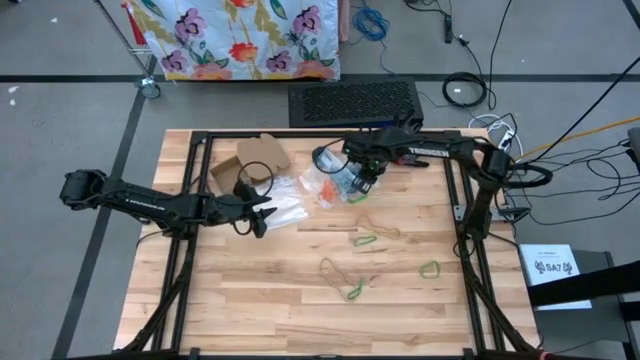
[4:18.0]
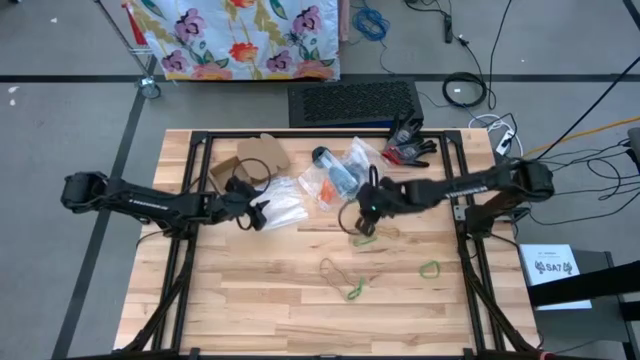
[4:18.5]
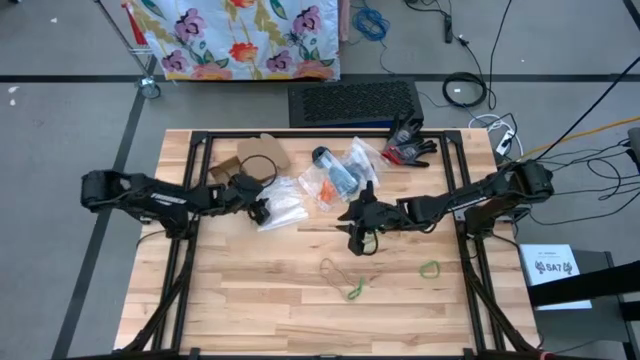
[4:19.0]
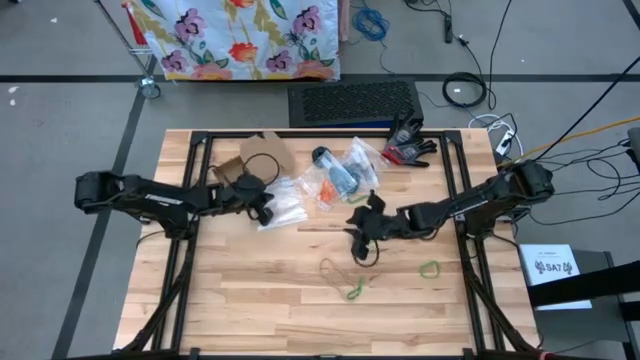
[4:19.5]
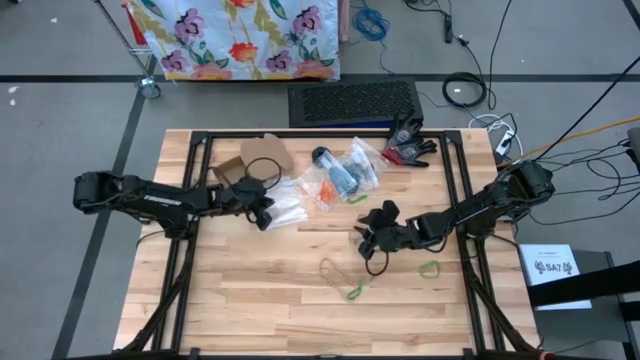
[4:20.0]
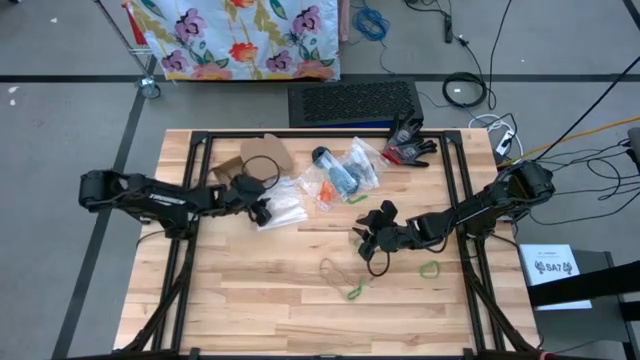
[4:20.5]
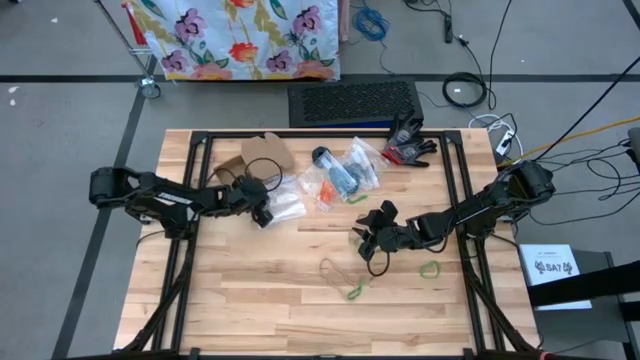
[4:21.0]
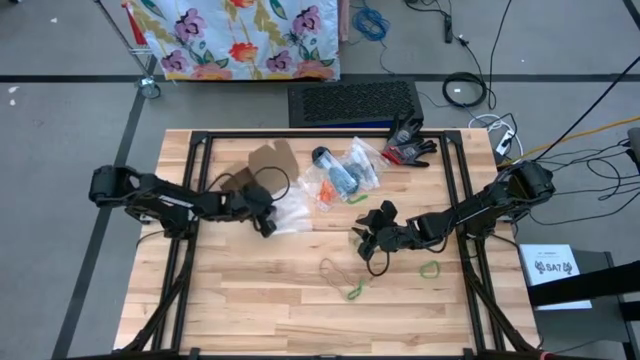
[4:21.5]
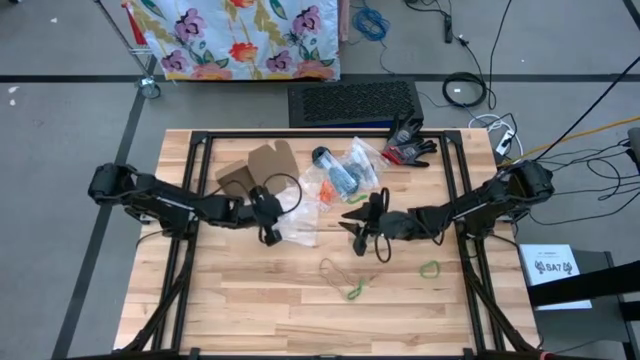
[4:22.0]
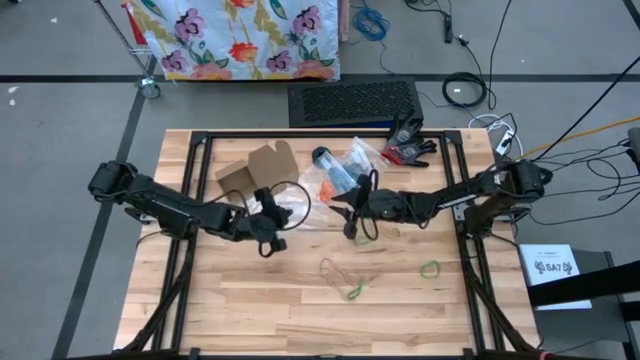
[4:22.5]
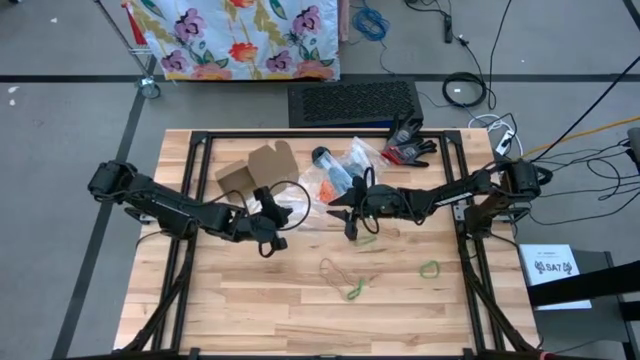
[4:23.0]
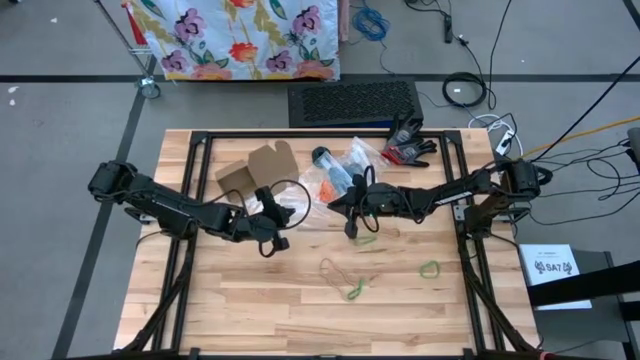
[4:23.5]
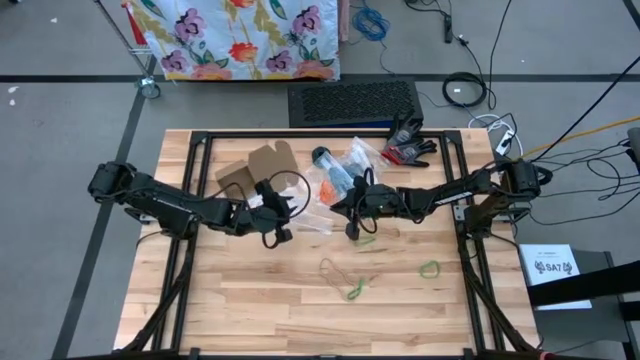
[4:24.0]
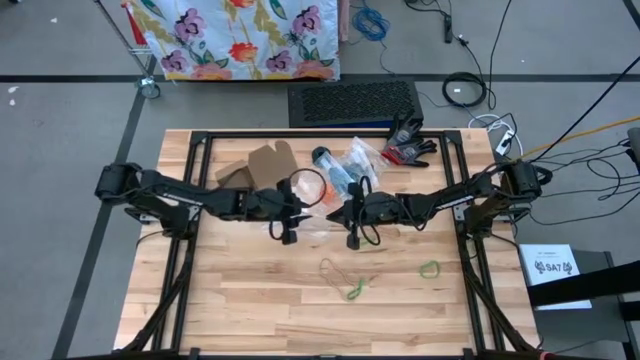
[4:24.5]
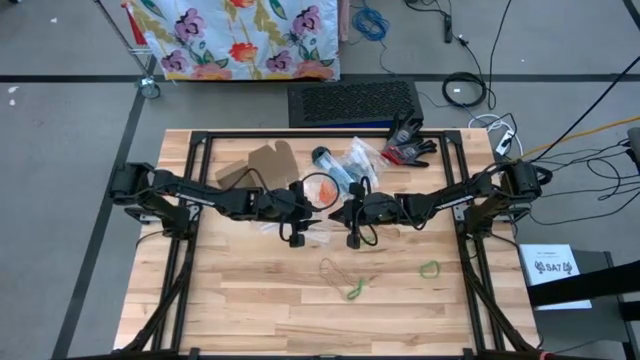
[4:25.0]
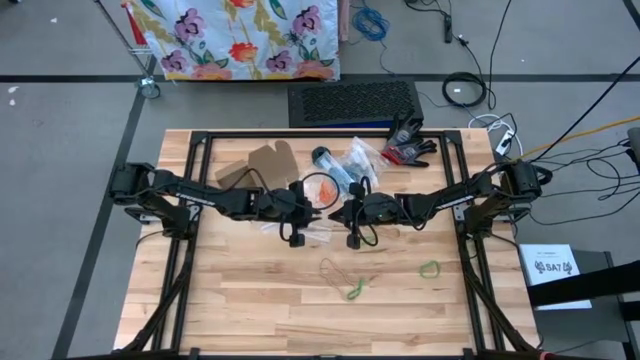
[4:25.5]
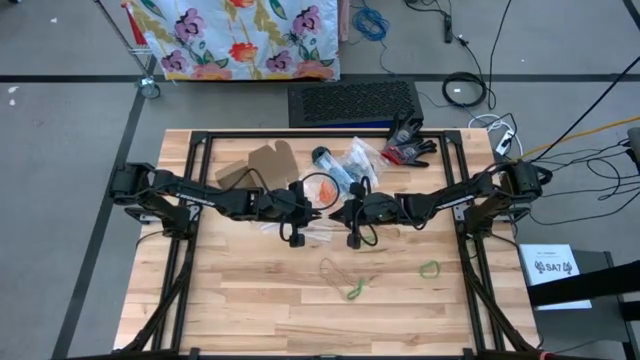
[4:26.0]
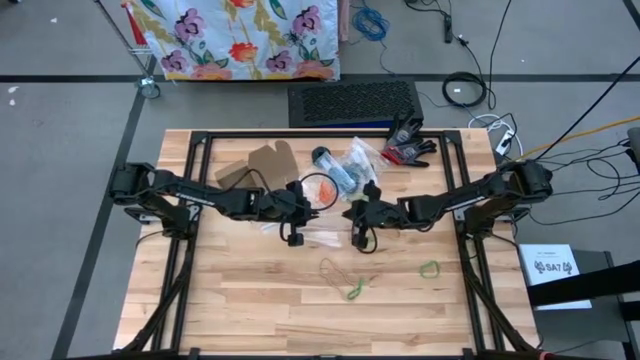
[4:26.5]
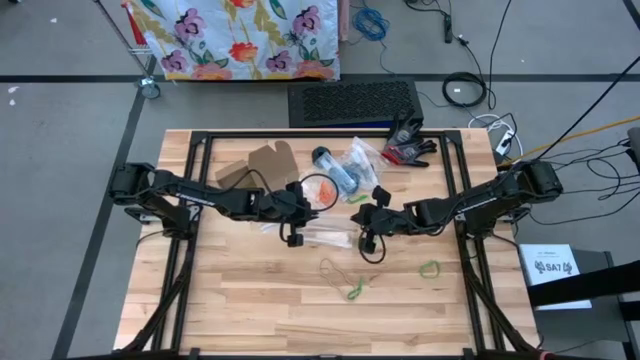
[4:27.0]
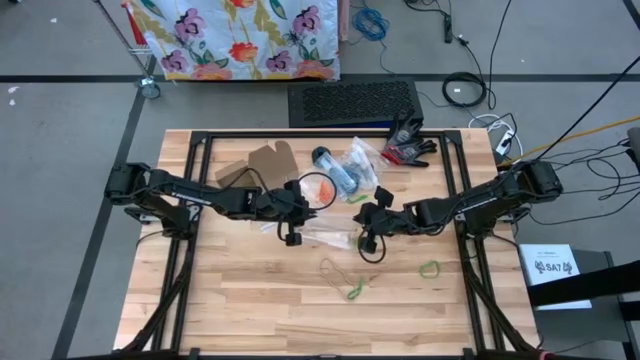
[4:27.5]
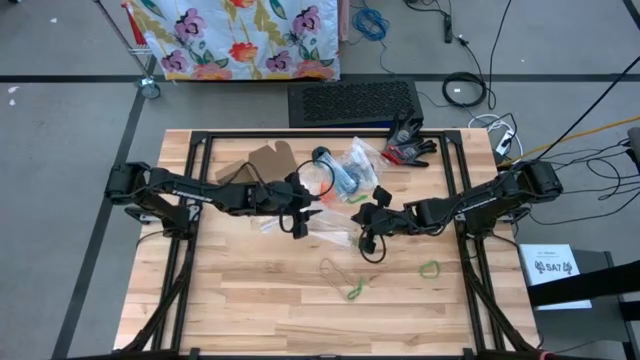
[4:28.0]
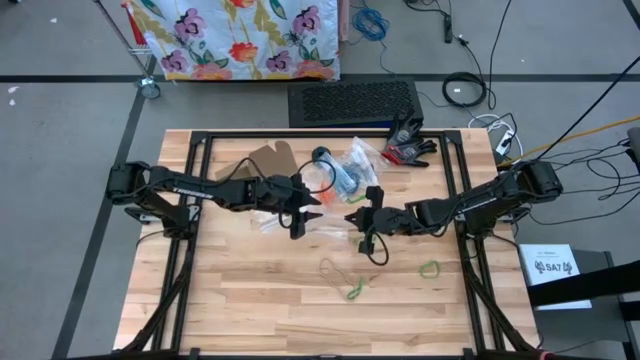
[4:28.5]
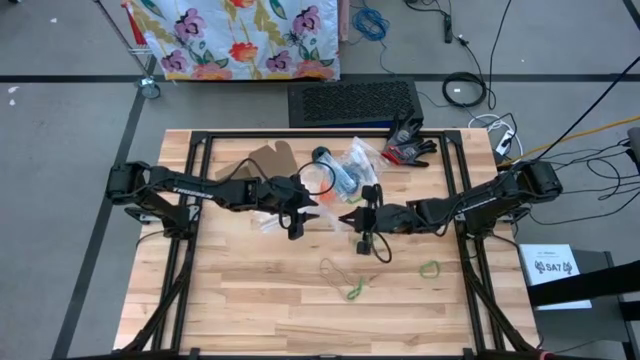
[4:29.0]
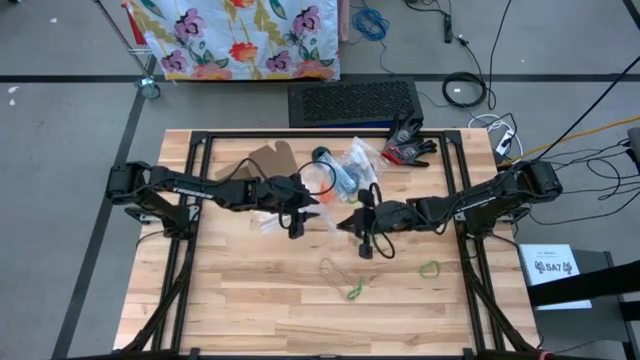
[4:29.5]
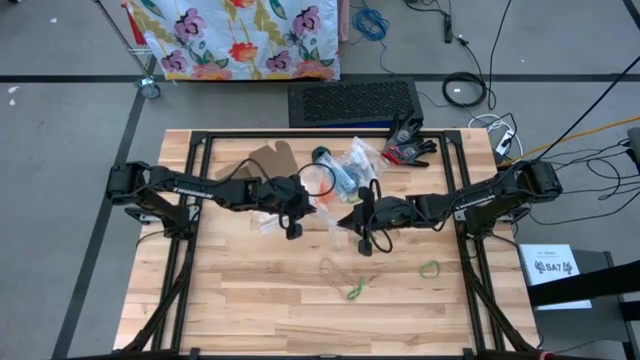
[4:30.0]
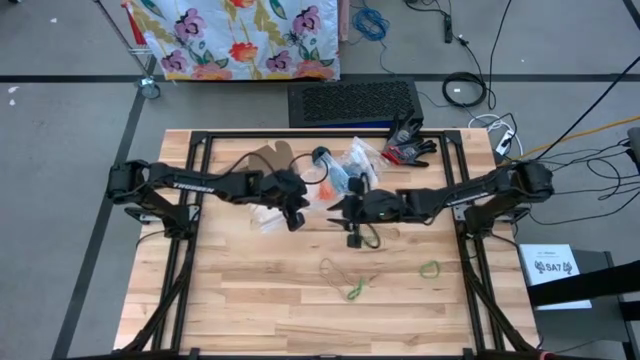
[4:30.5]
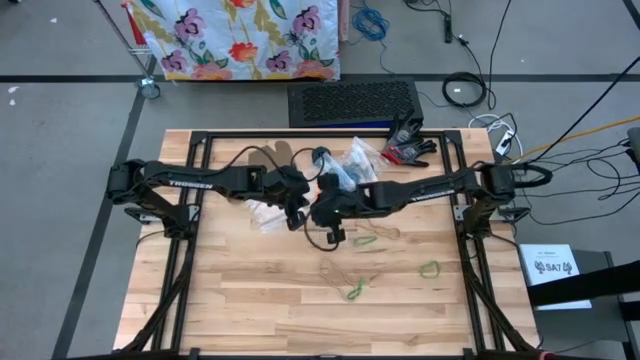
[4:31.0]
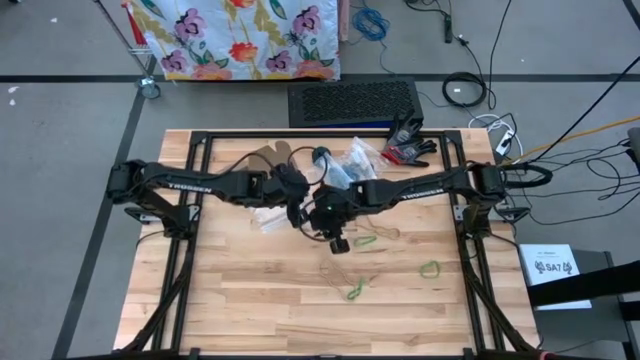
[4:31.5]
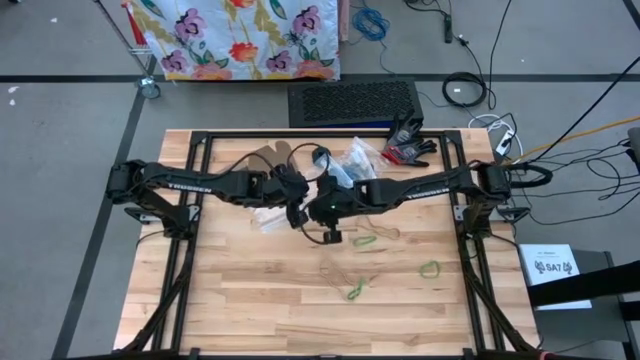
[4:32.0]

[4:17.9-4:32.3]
Task: Sort rubber bands
Open the transparent zip bag

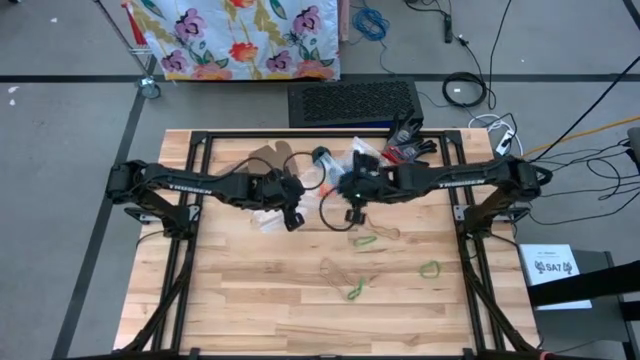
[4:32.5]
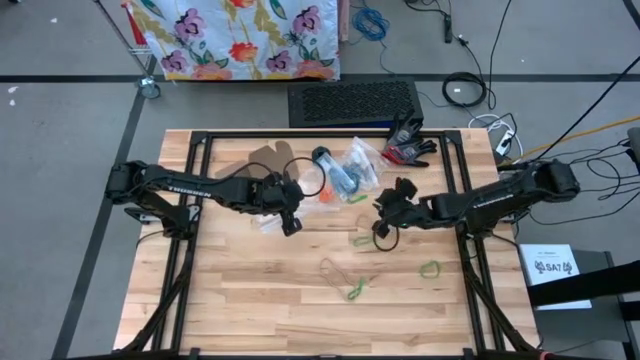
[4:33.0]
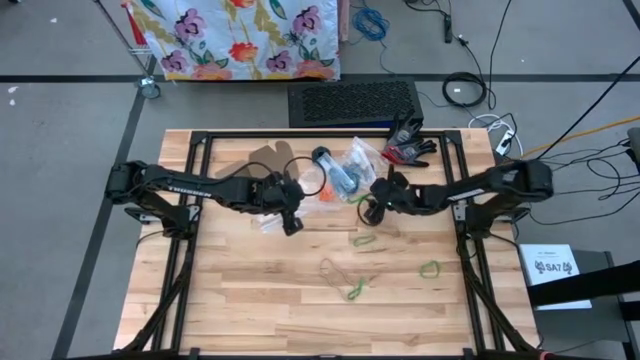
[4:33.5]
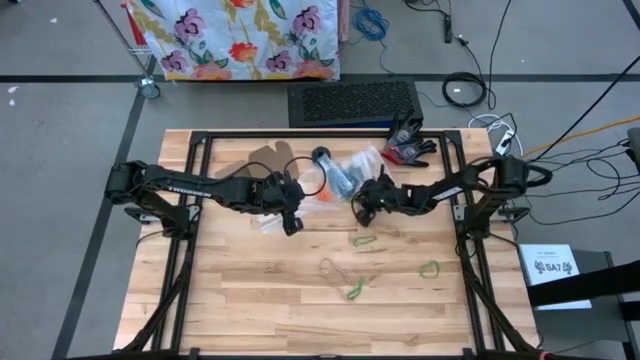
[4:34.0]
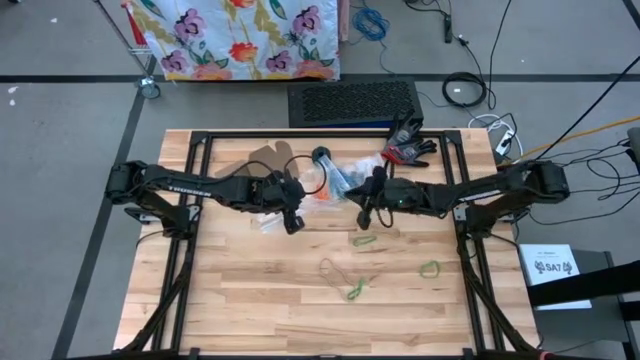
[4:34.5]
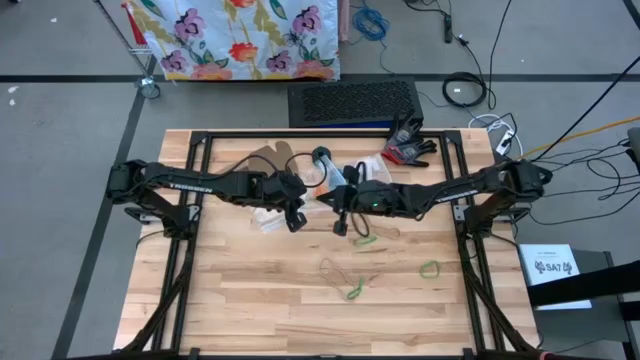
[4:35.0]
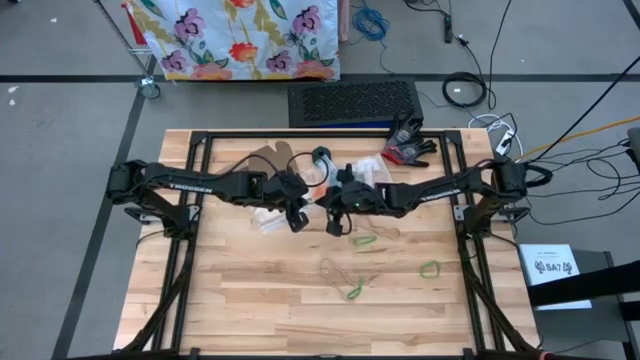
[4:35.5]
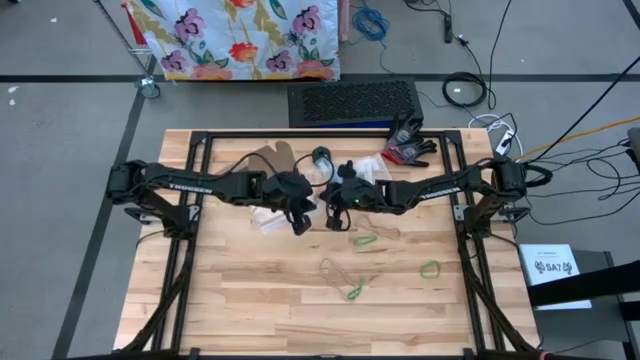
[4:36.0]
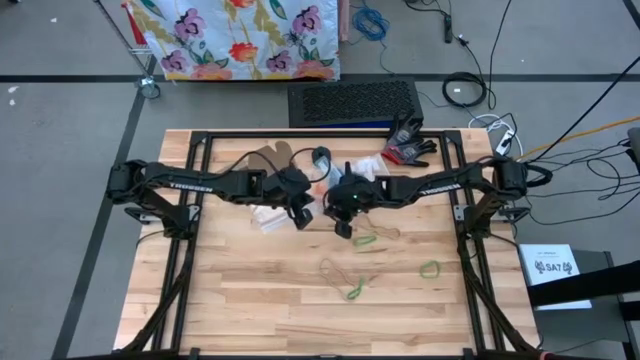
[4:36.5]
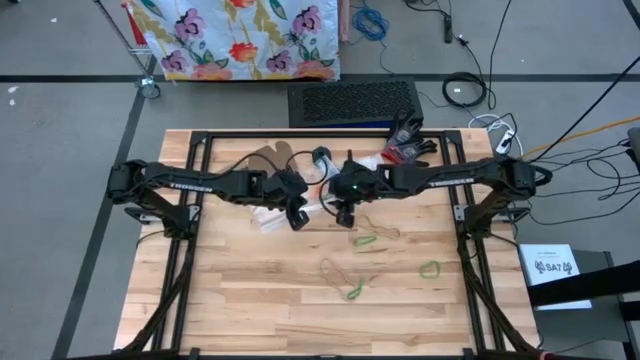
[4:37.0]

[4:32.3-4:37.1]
Put the green rubber band into the transparent zip bag

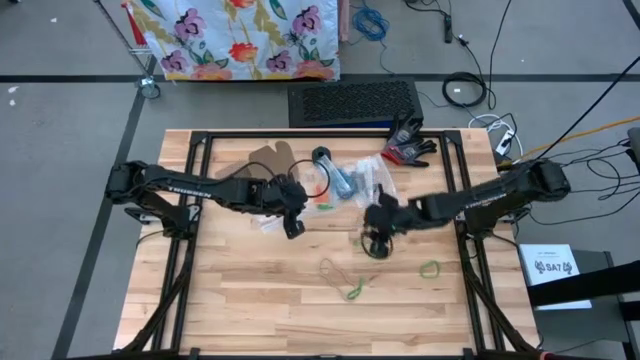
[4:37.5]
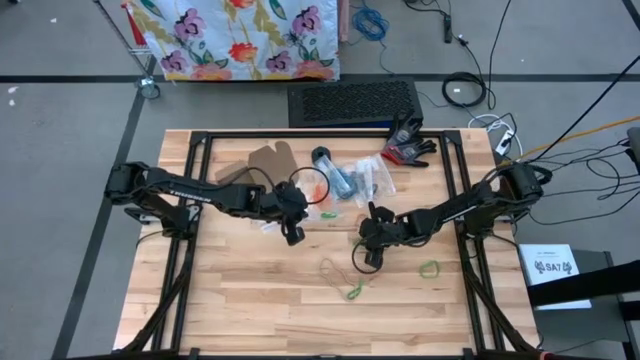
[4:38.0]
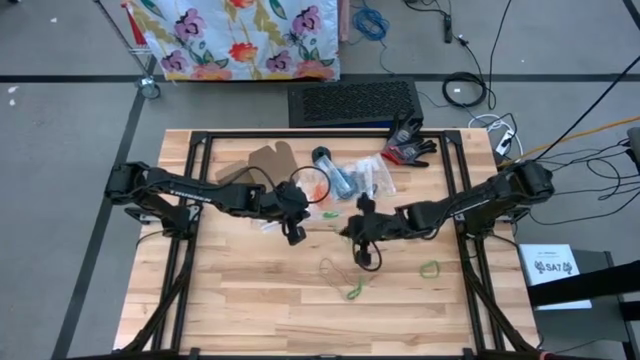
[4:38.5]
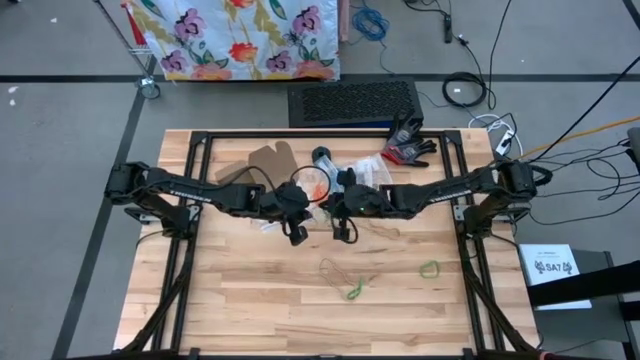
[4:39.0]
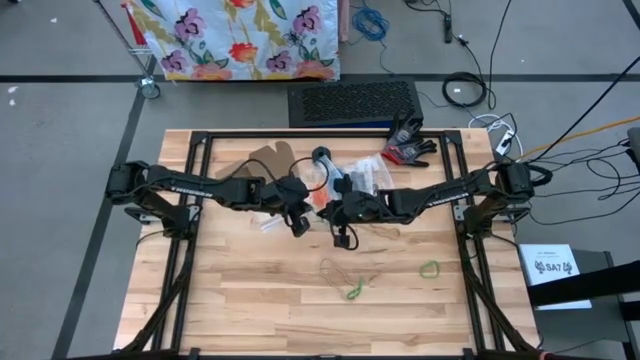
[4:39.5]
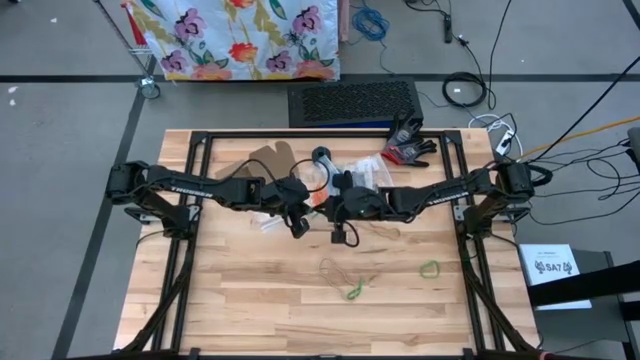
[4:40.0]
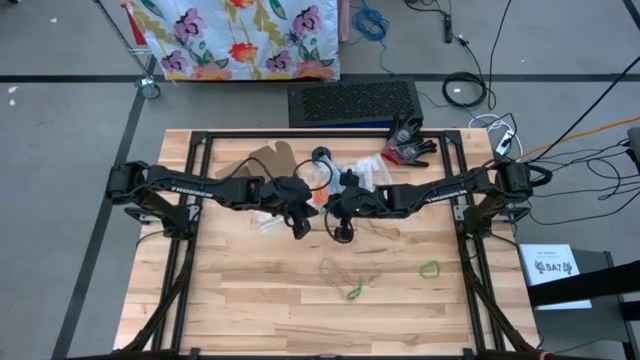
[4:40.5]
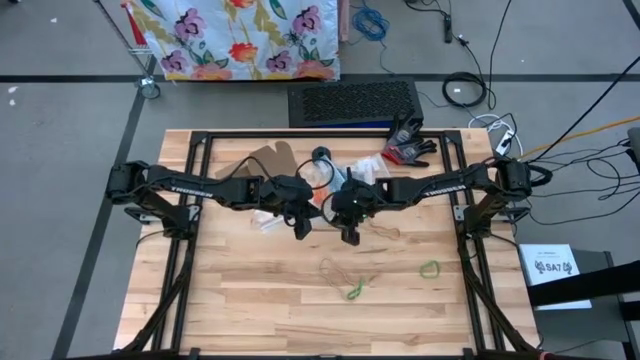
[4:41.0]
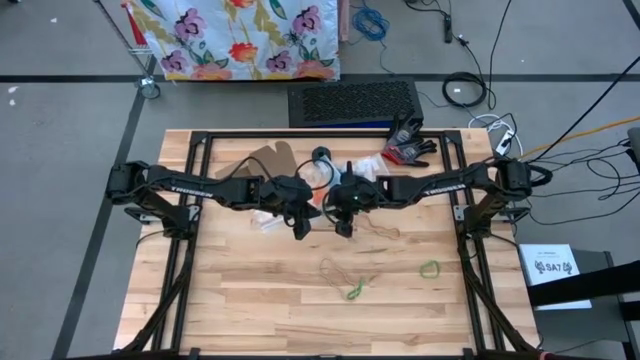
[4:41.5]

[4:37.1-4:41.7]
Put the green rubber band into the transparent zip bag
